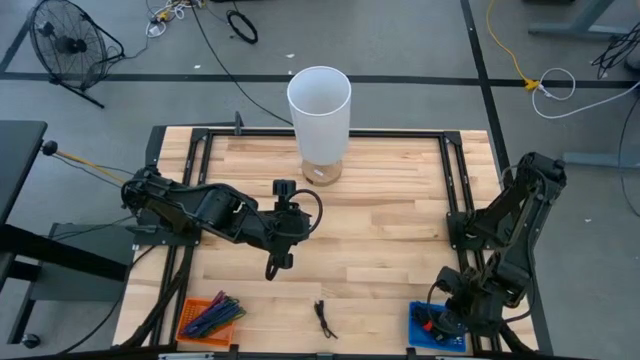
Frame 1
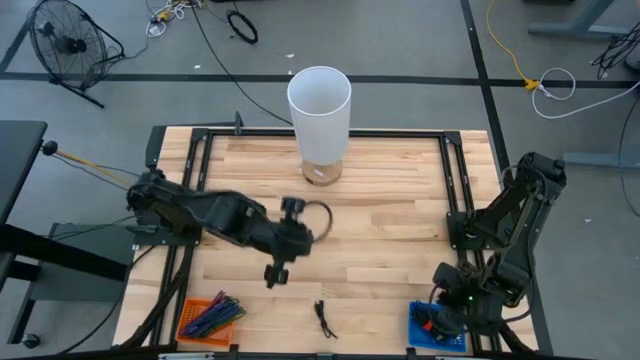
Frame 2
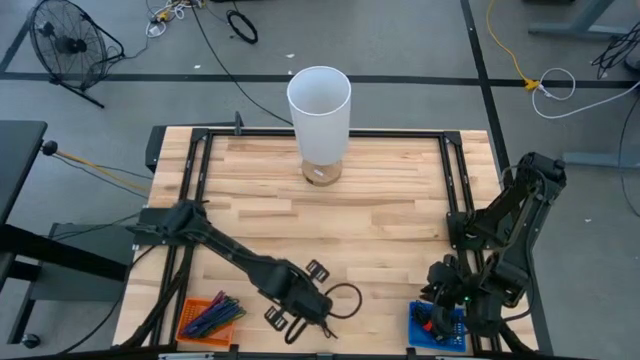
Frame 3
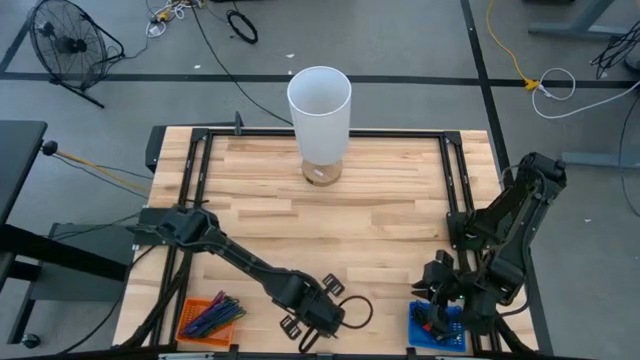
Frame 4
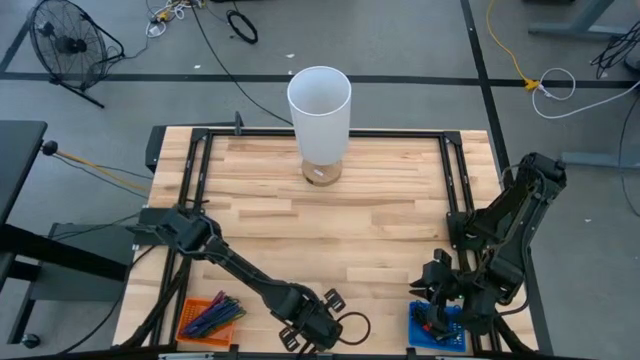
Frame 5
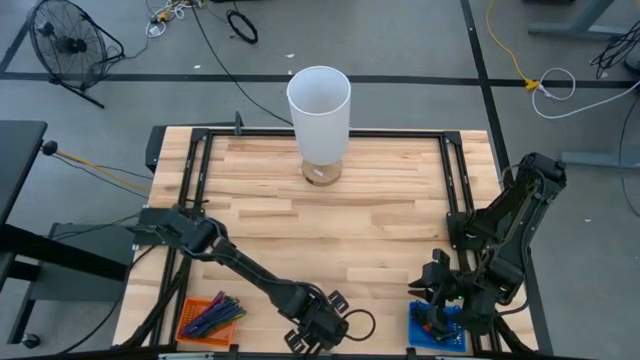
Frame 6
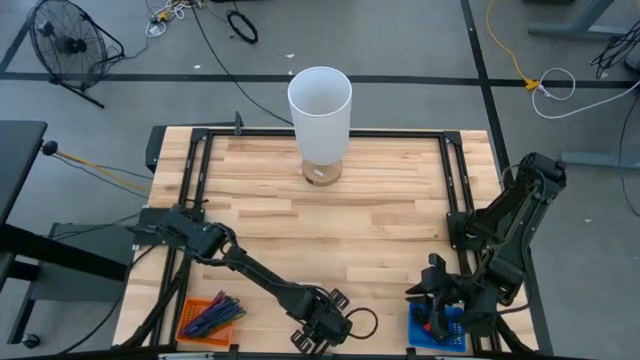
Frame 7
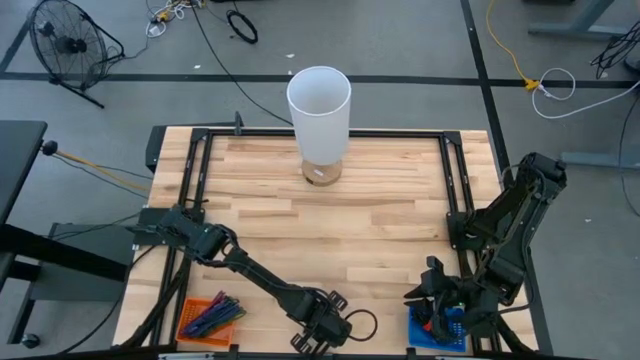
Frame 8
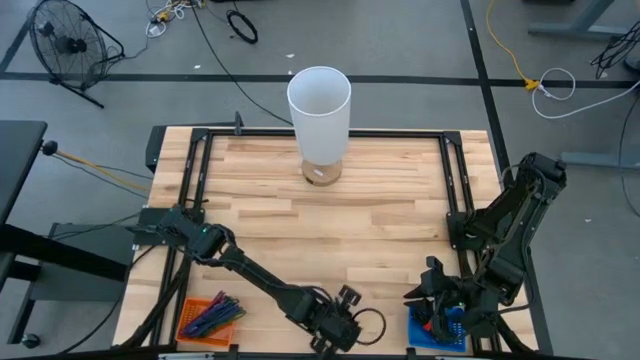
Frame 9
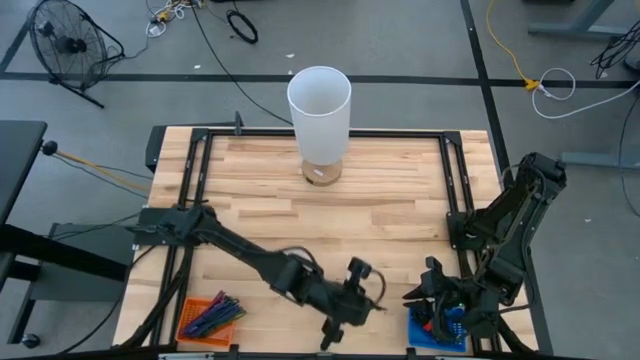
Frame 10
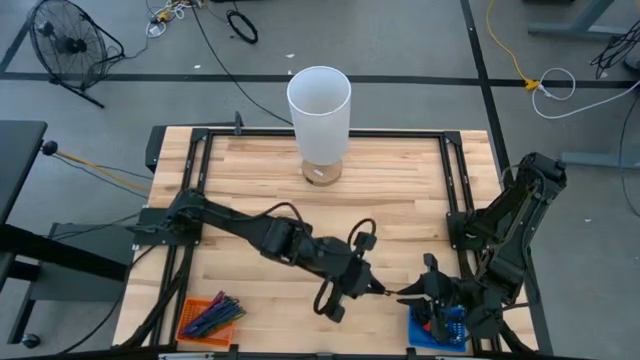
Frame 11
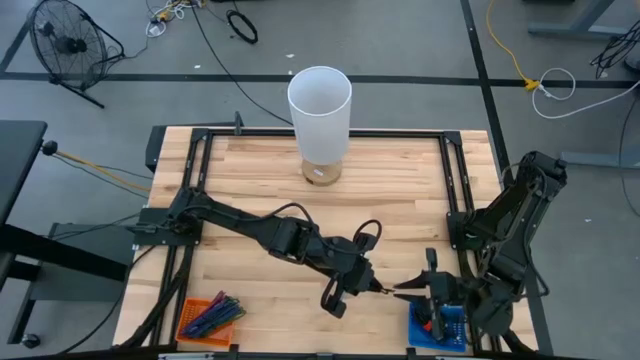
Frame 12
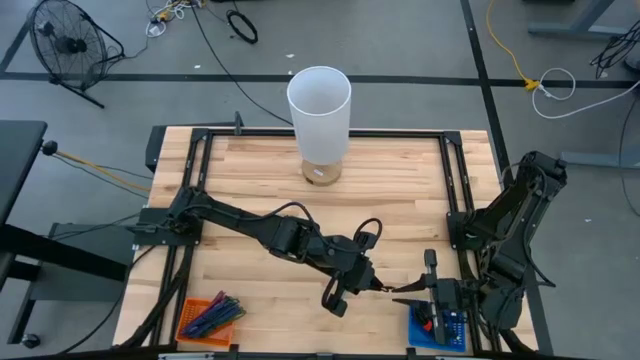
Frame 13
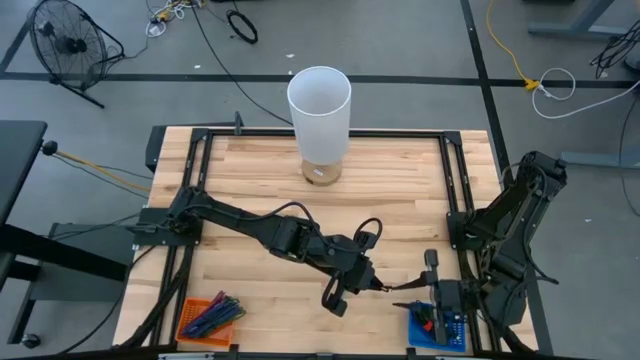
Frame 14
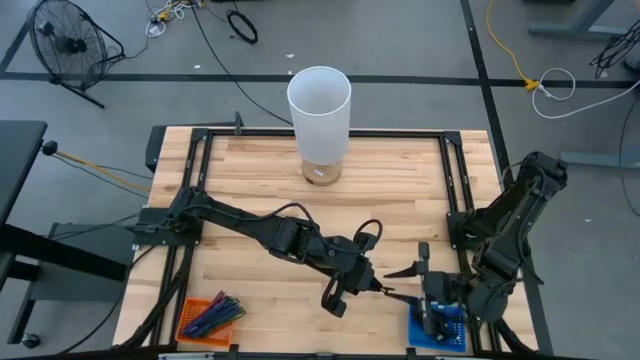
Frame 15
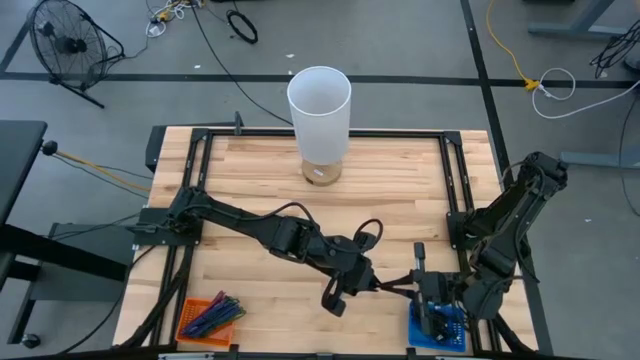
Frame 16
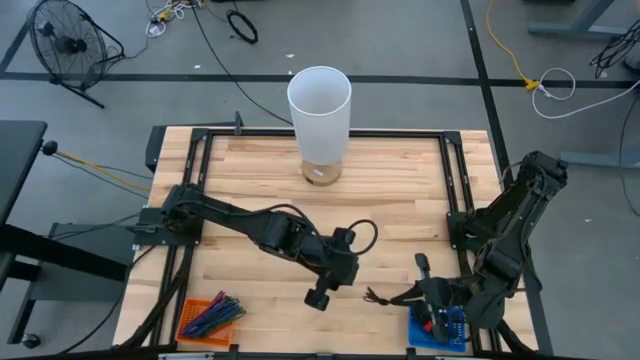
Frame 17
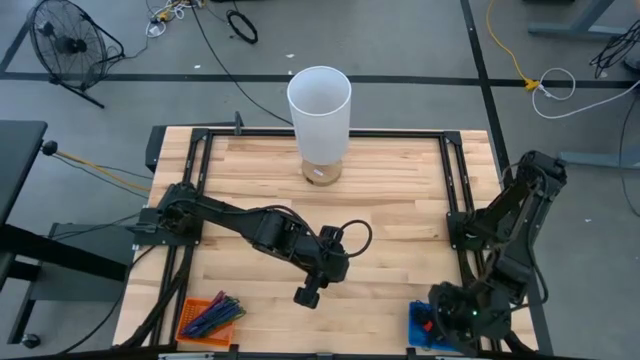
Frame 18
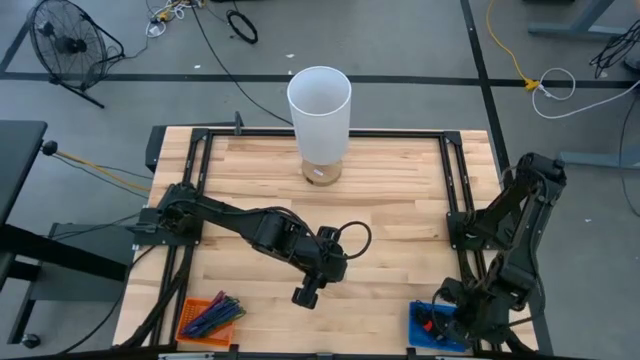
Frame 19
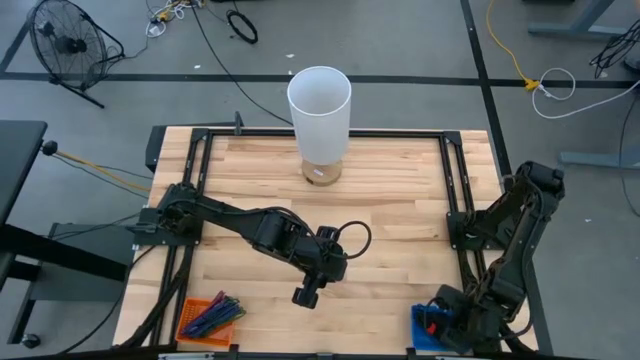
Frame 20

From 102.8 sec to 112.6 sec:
Task: Pick & Place USB Port
Put the black charger cable into the blue bin

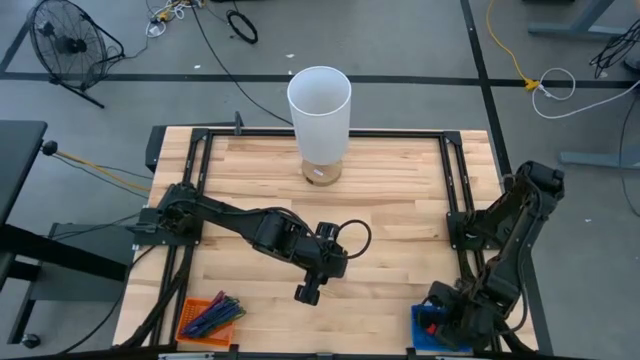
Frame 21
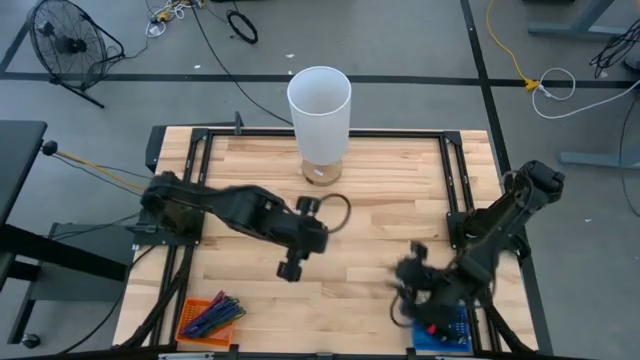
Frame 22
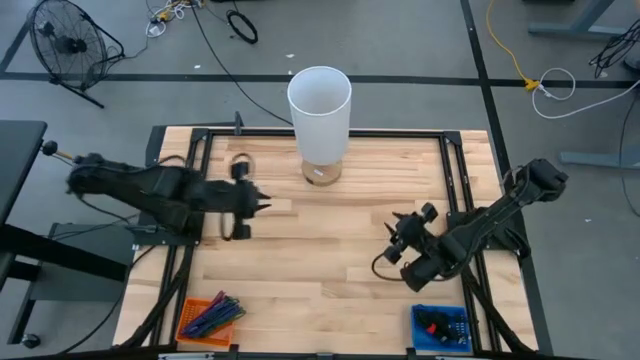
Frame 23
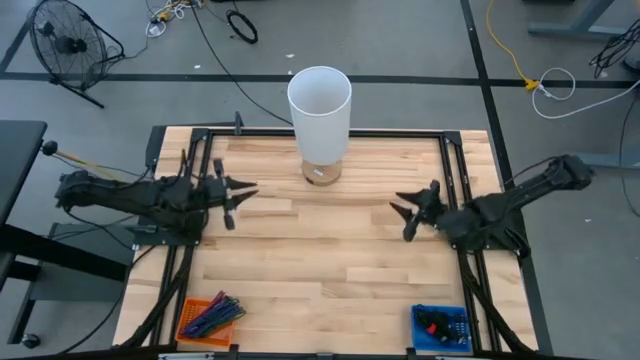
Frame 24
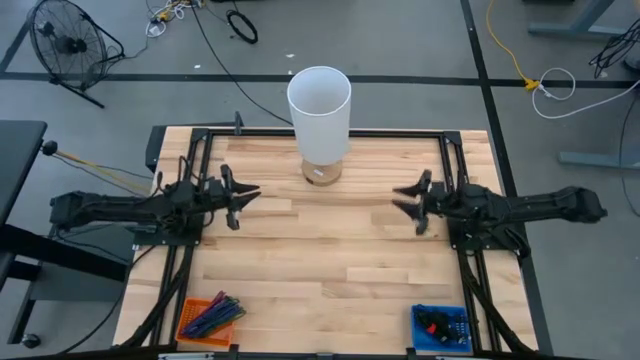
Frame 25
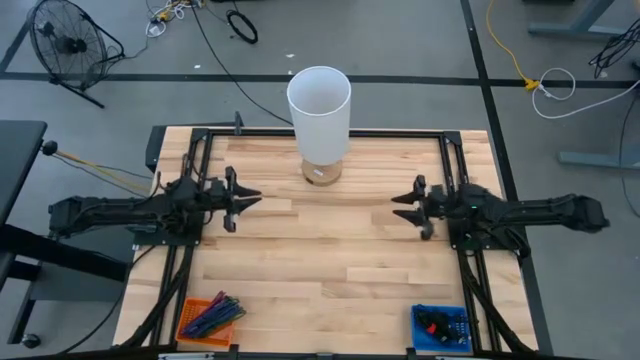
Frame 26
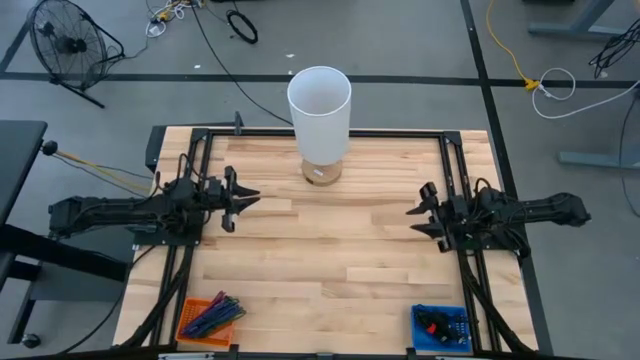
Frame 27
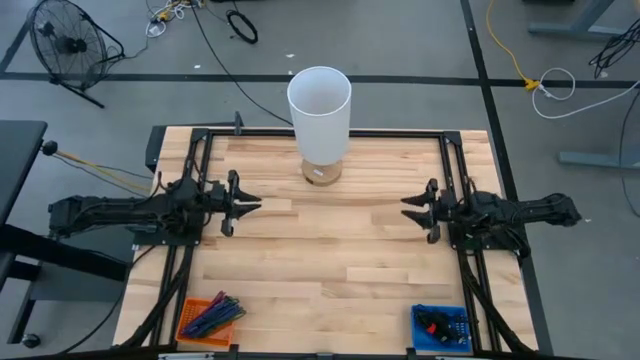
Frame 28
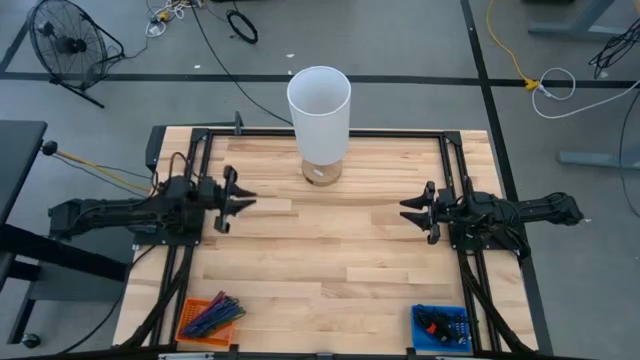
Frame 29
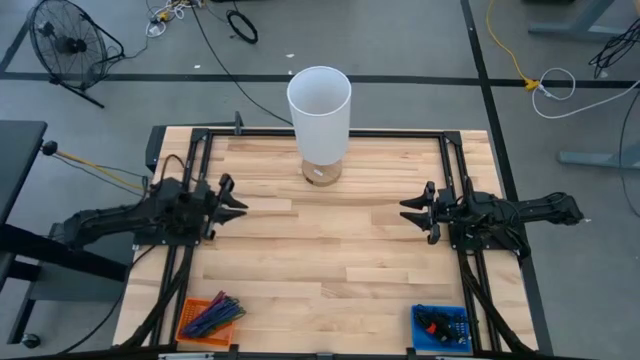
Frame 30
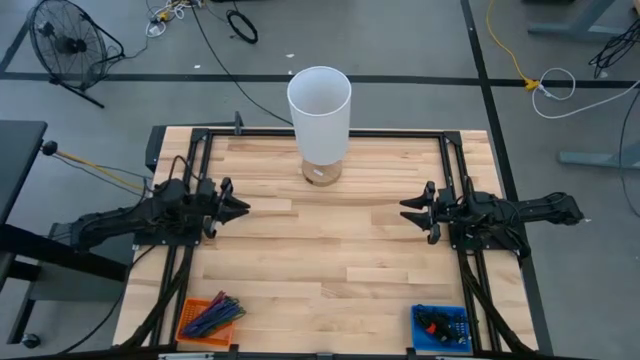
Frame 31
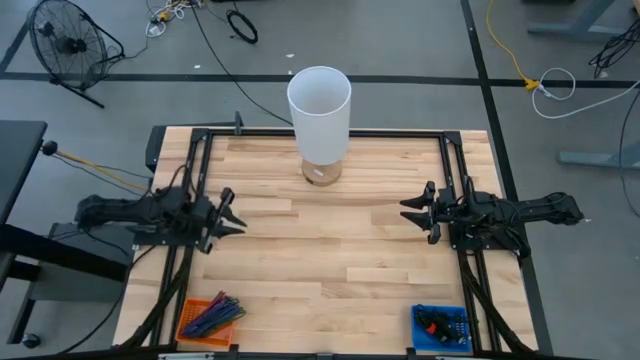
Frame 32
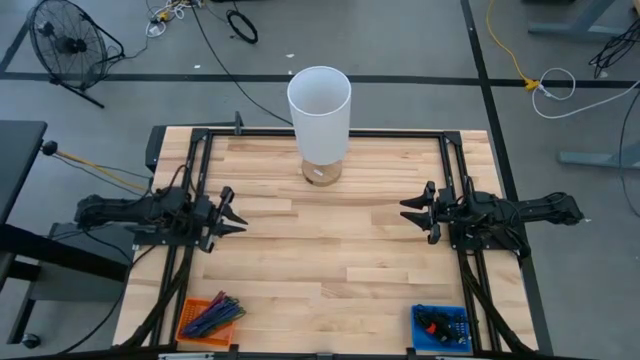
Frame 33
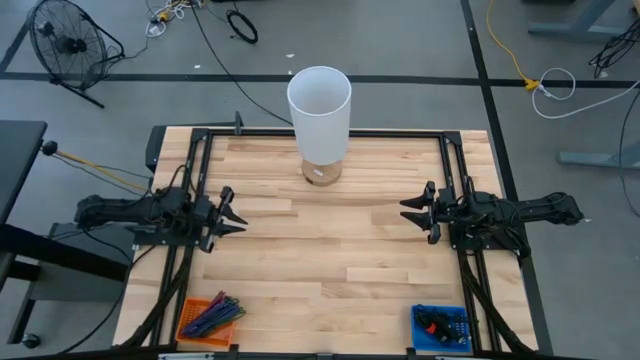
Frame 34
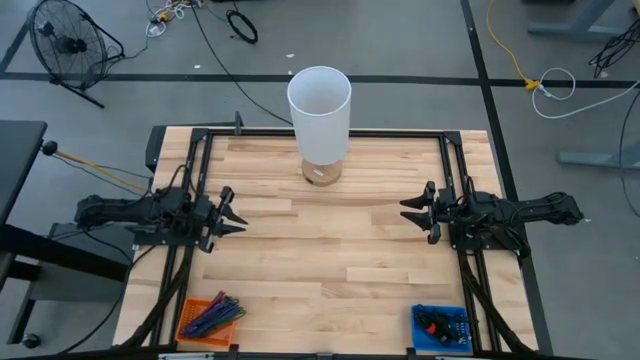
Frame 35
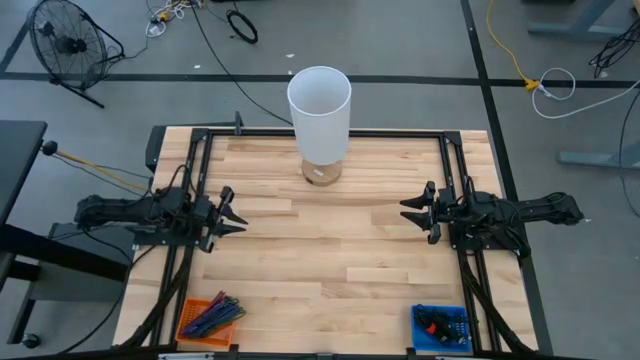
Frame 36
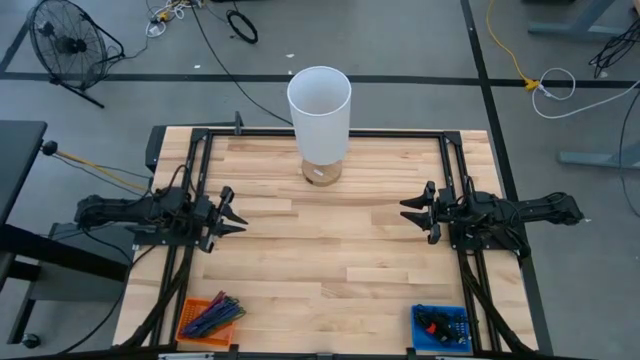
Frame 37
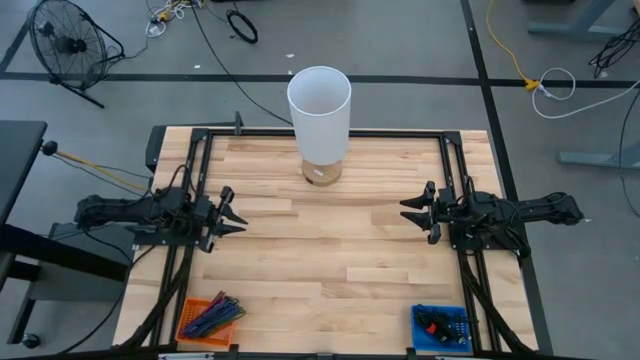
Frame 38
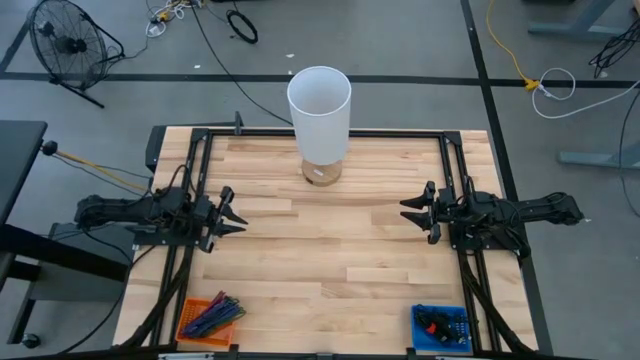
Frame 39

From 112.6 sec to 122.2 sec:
Return to Home Position
